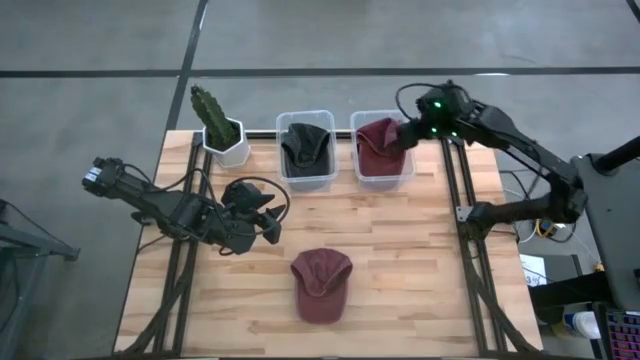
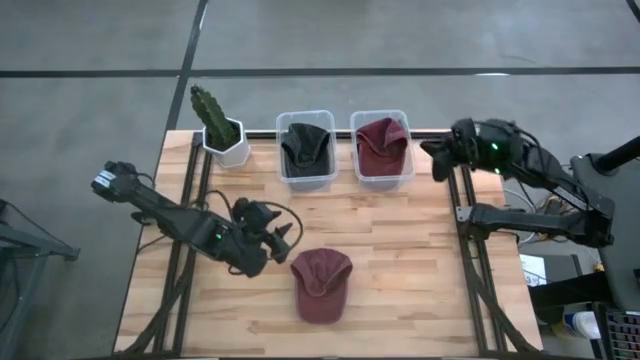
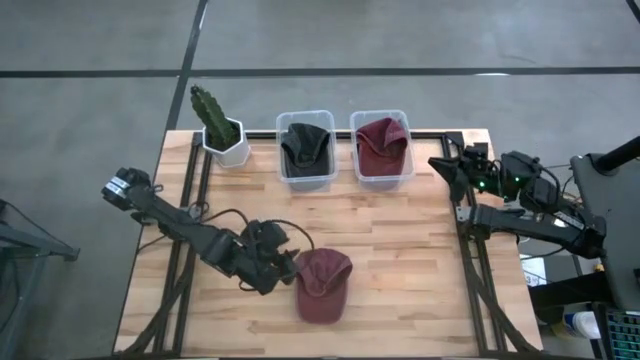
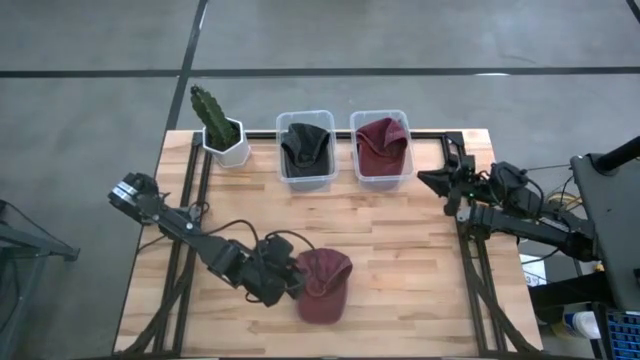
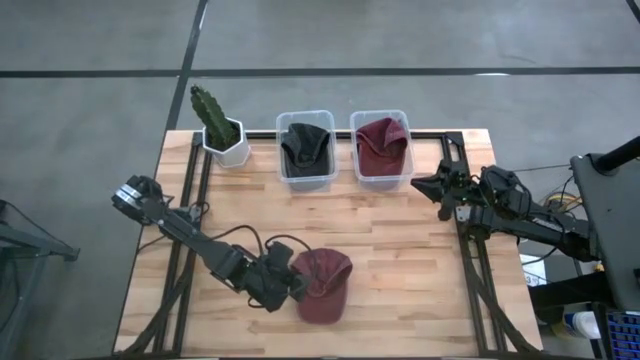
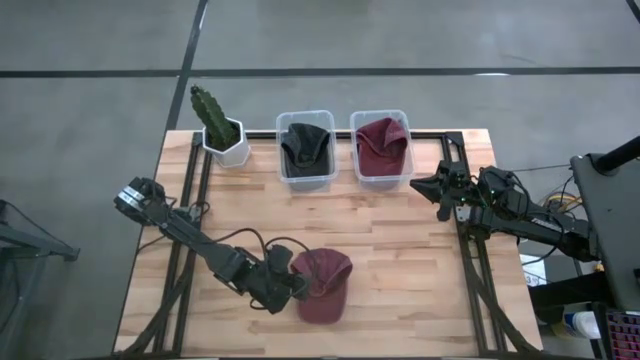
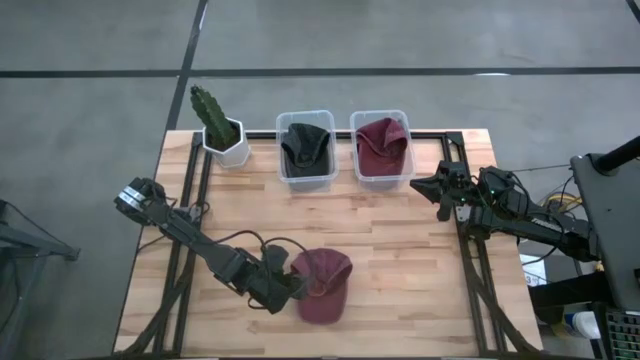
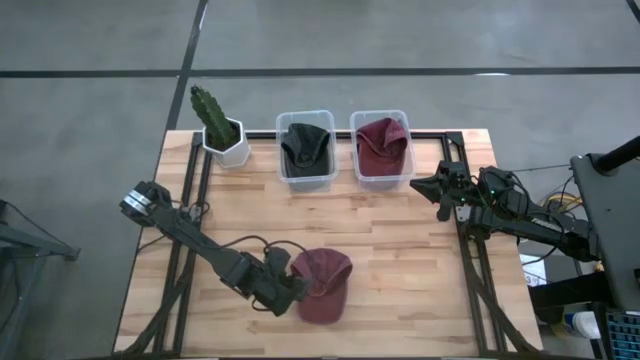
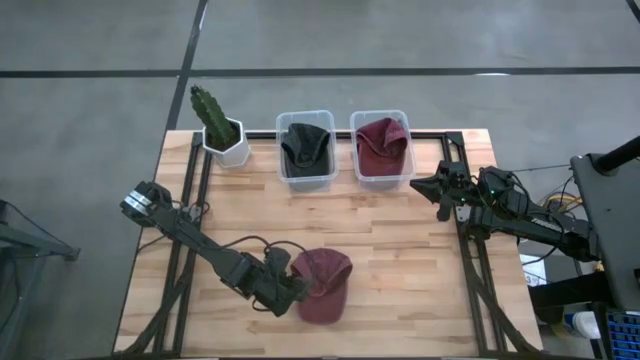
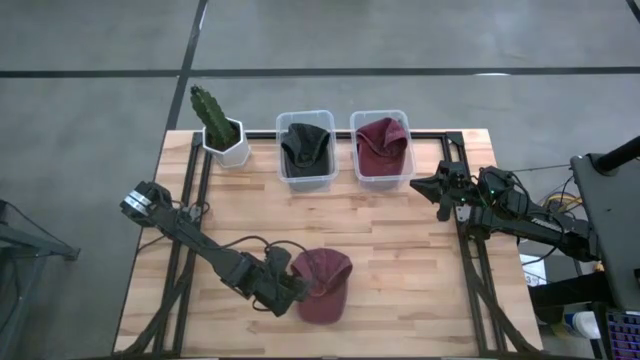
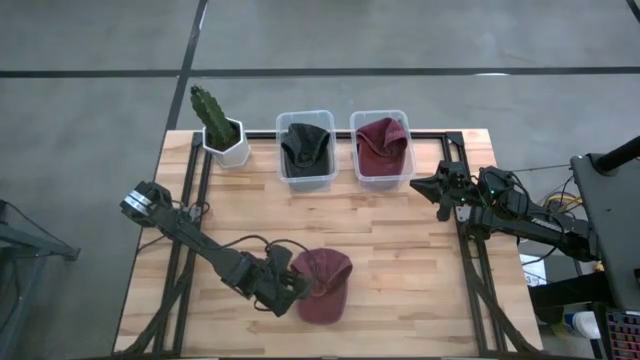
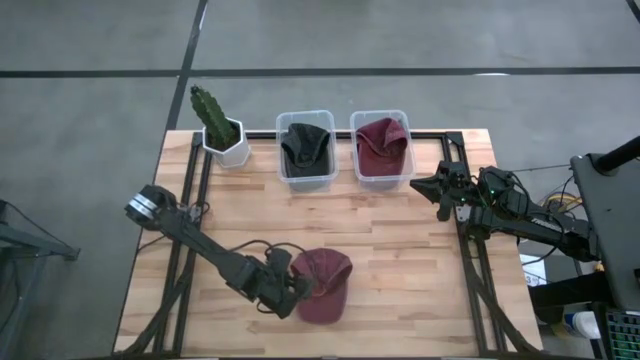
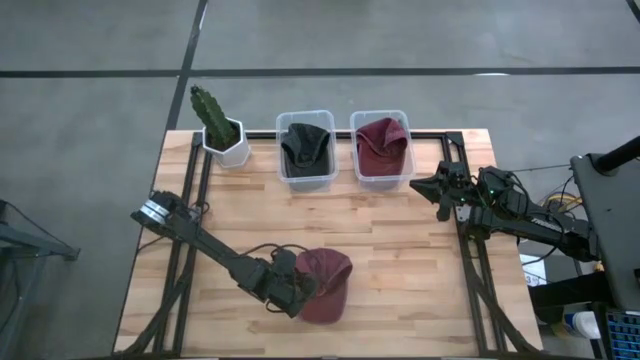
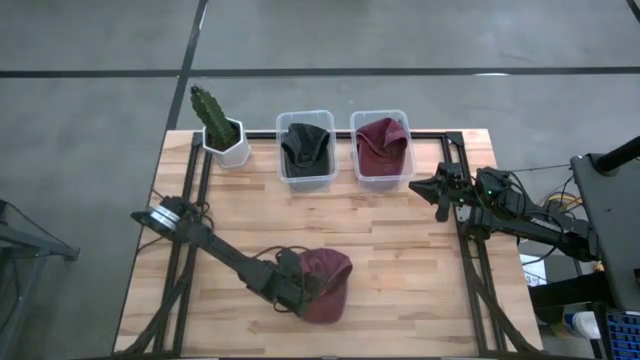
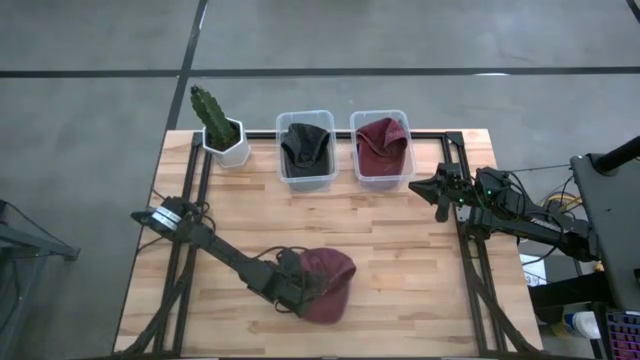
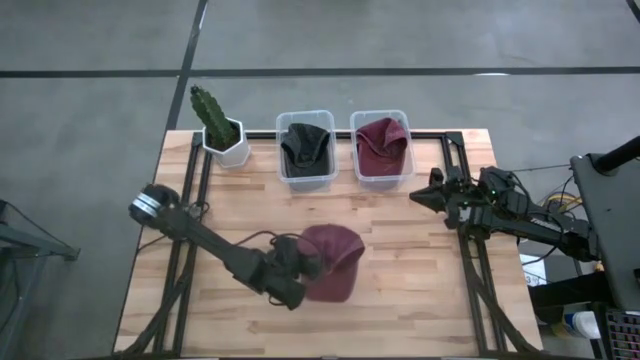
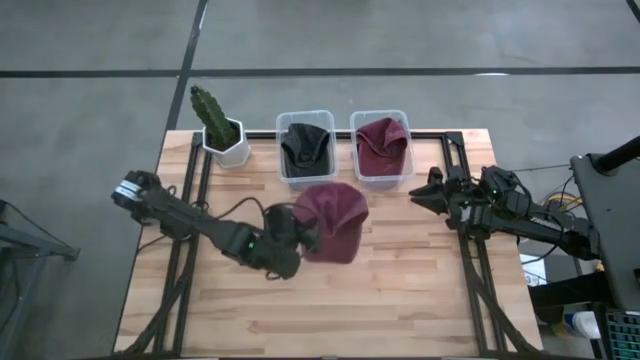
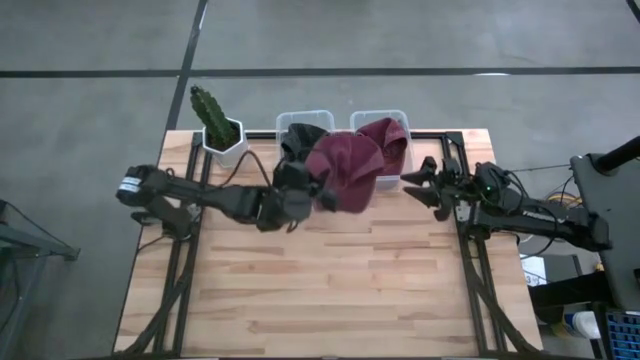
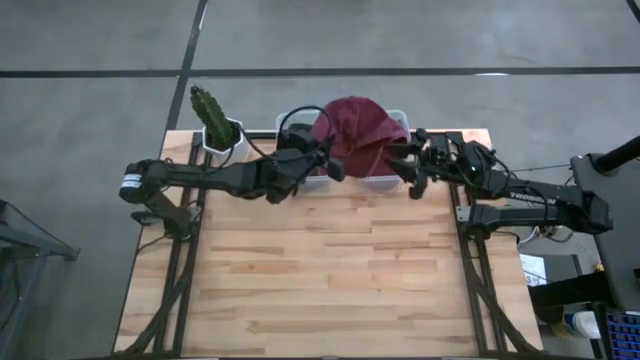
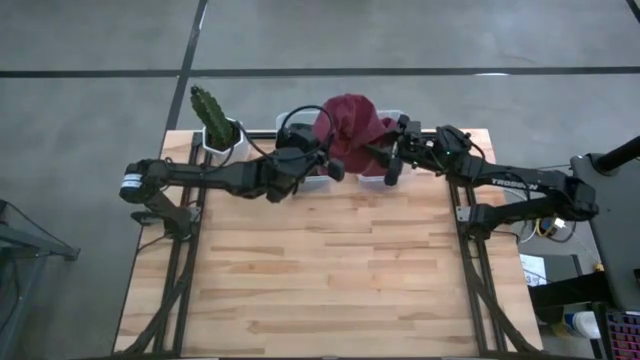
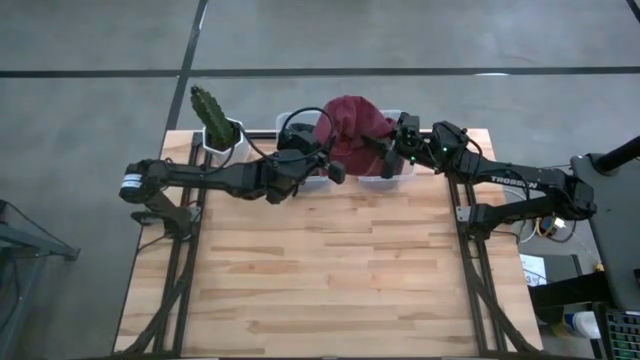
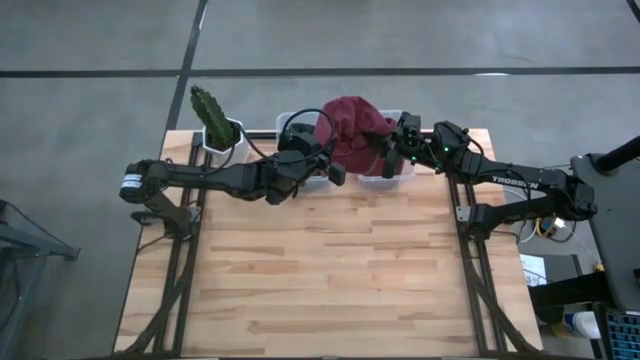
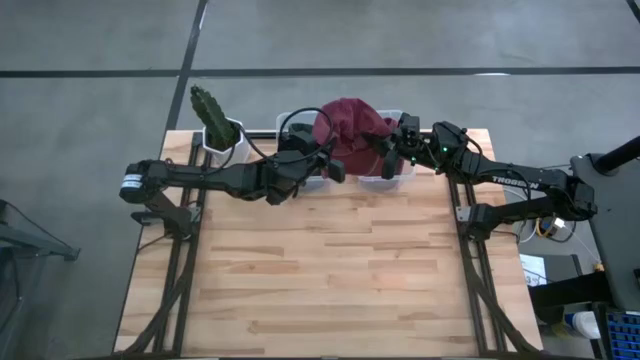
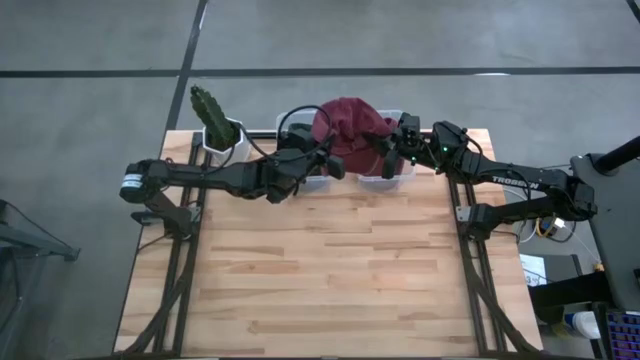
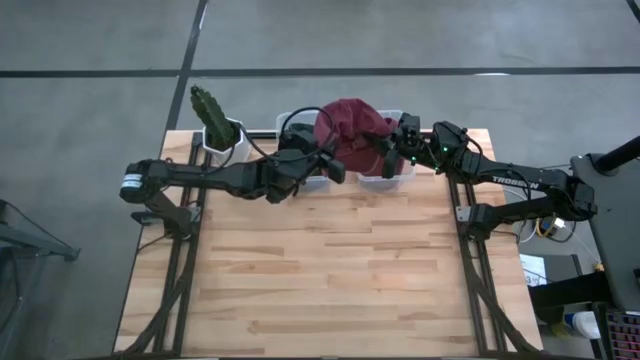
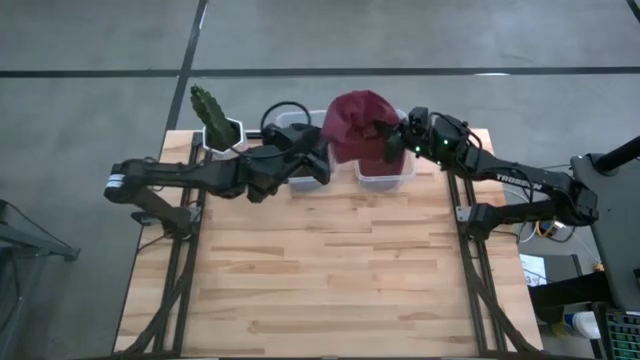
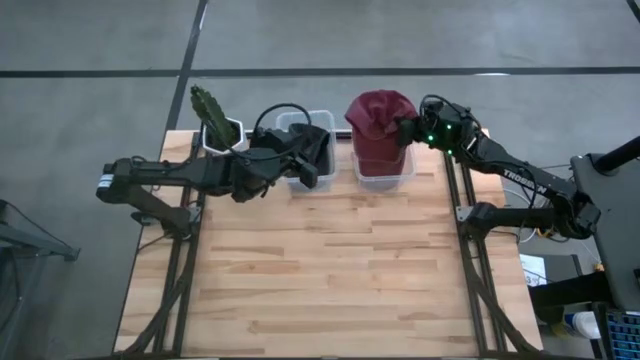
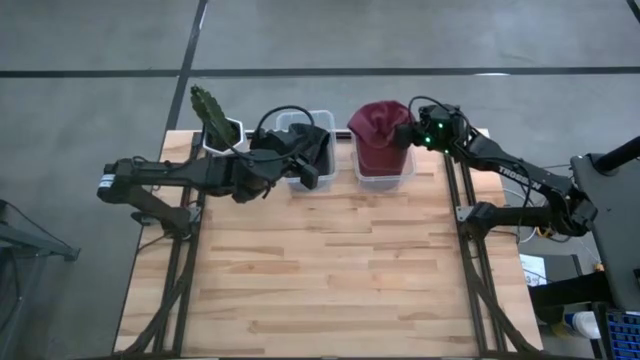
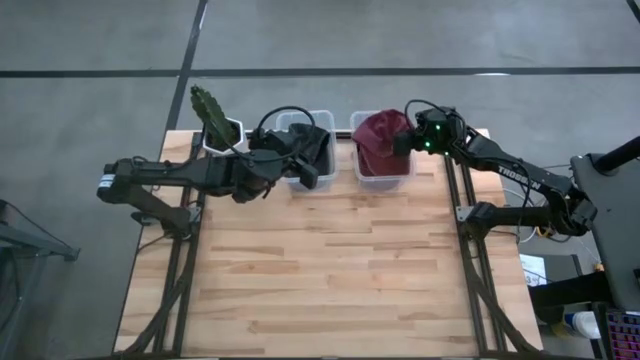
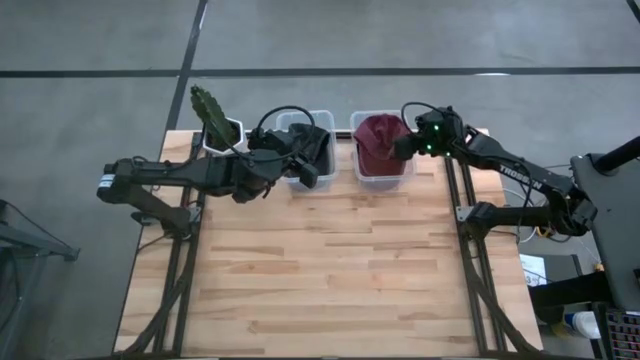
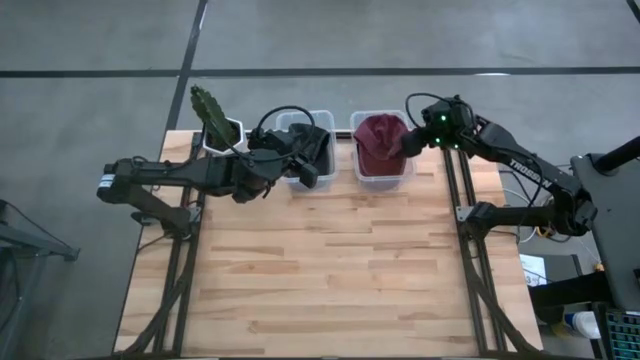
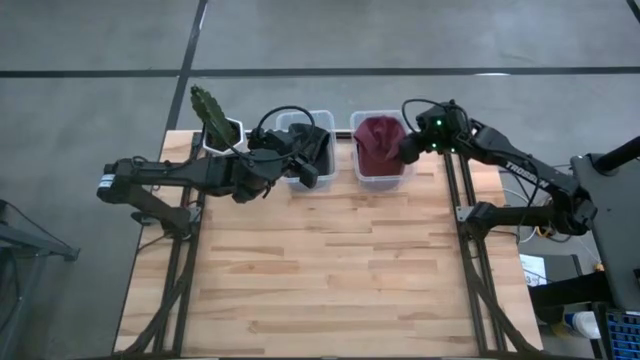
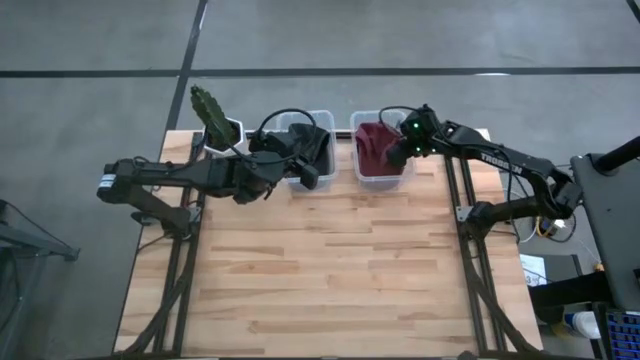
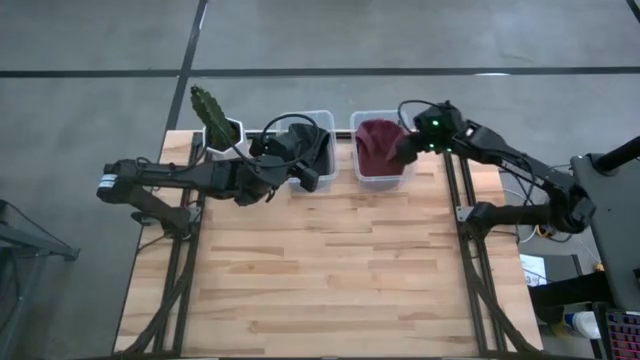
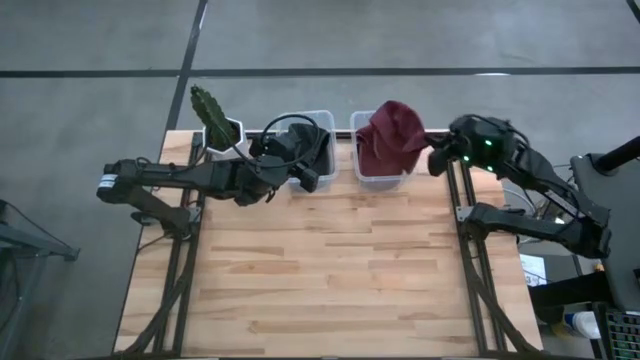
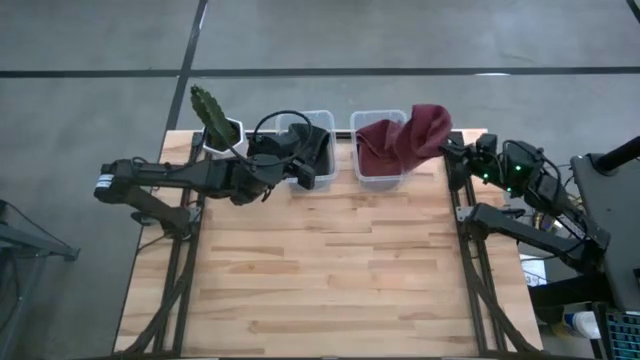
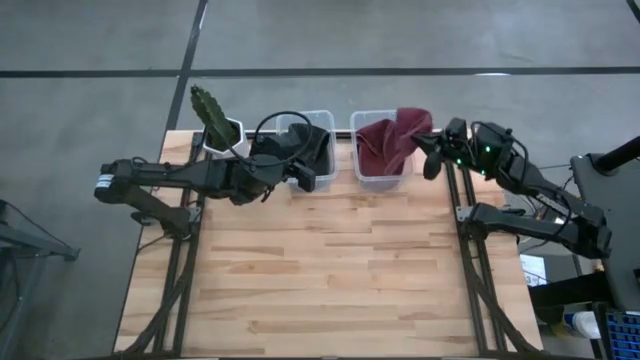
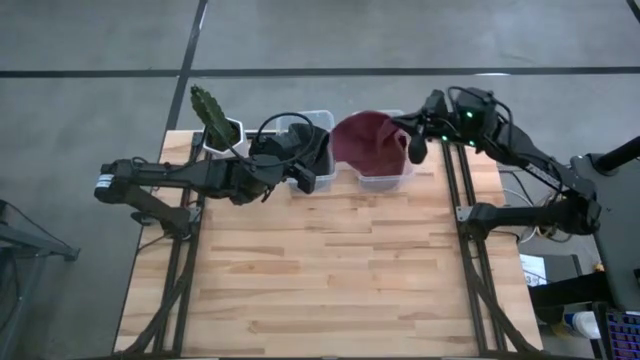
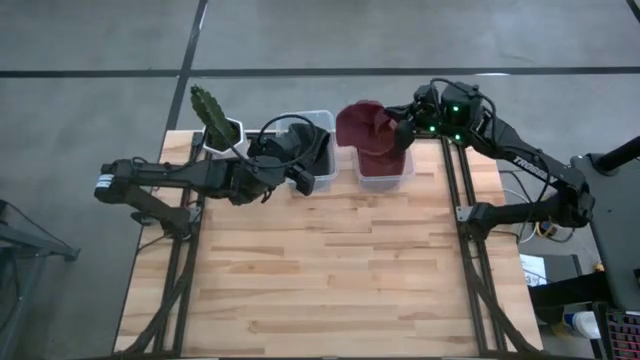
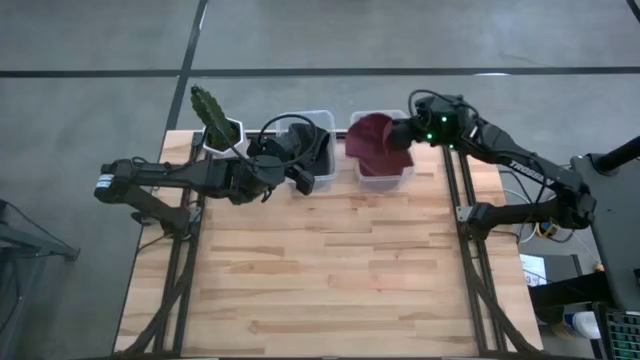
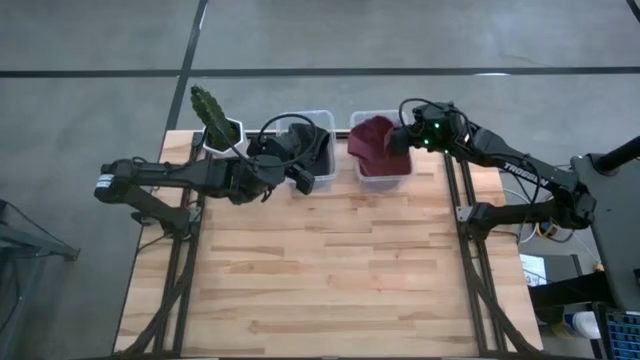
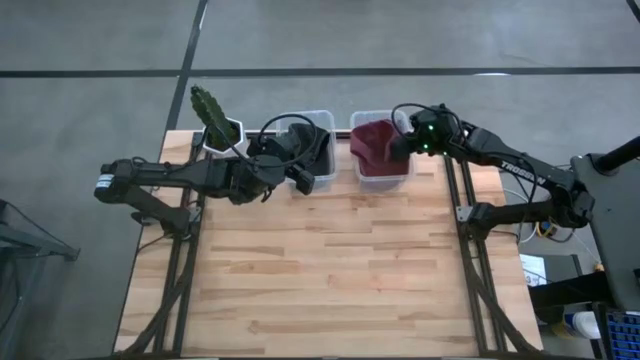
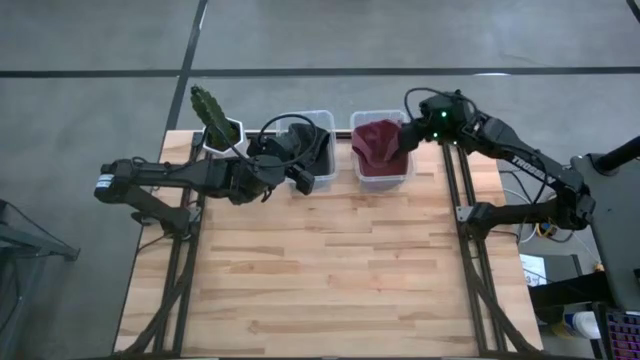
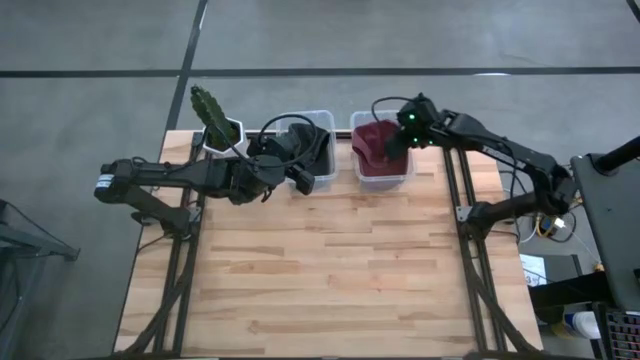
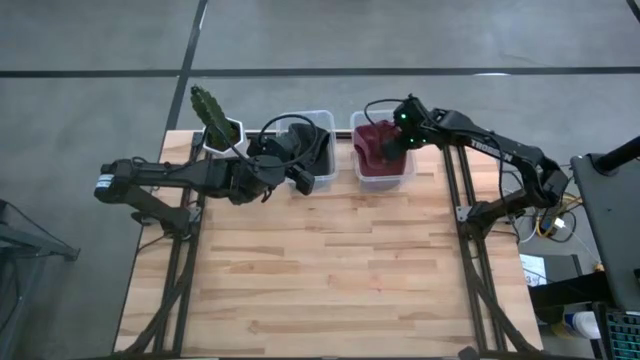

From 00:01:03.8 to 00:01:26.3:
Task: Pick & Place hat
Put the maroon cap into the right transparent bin
